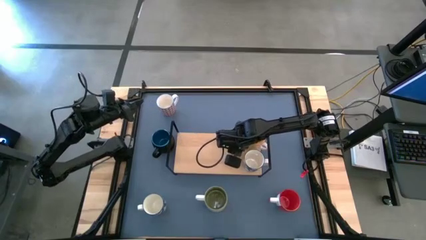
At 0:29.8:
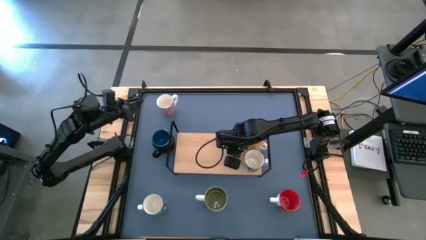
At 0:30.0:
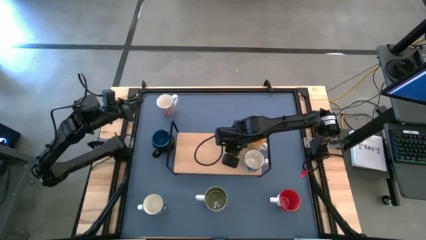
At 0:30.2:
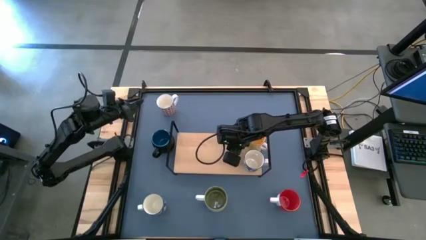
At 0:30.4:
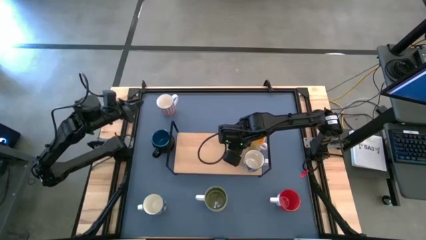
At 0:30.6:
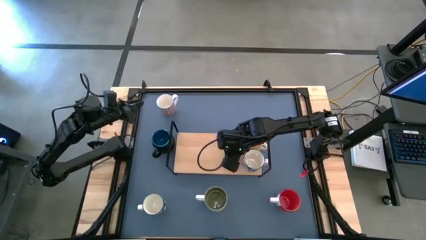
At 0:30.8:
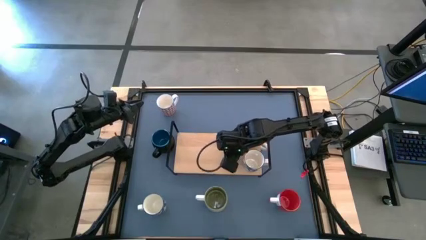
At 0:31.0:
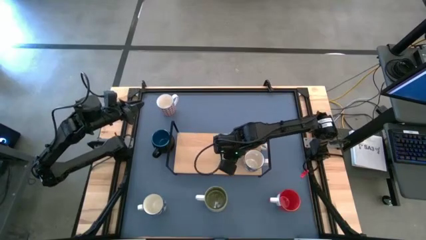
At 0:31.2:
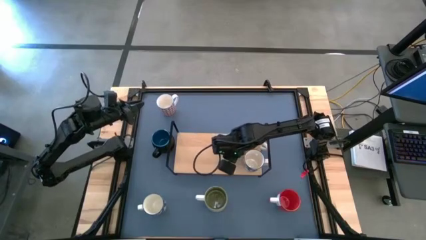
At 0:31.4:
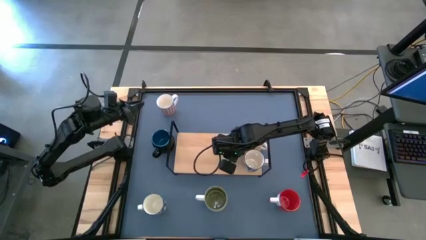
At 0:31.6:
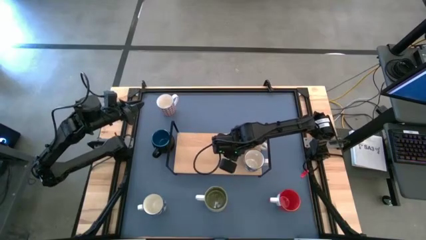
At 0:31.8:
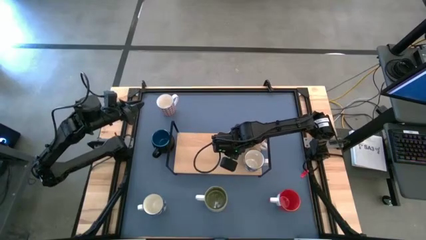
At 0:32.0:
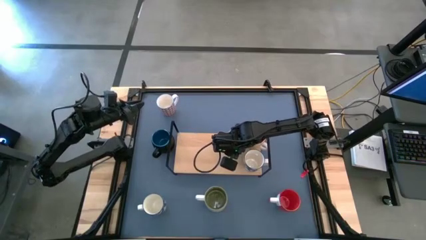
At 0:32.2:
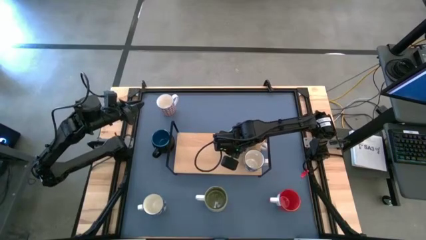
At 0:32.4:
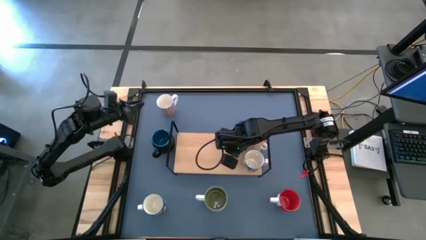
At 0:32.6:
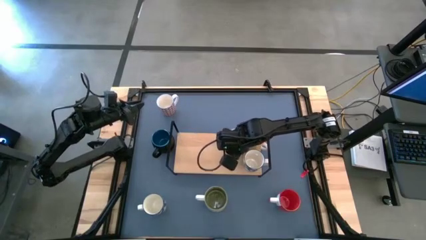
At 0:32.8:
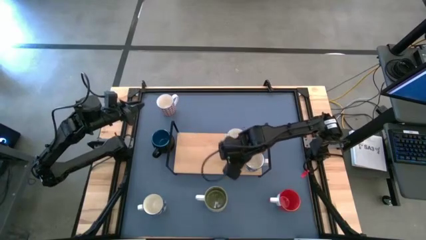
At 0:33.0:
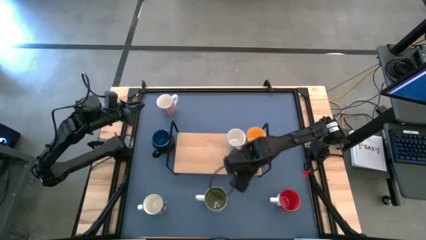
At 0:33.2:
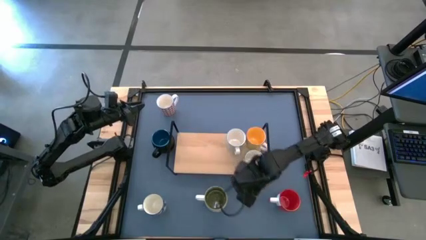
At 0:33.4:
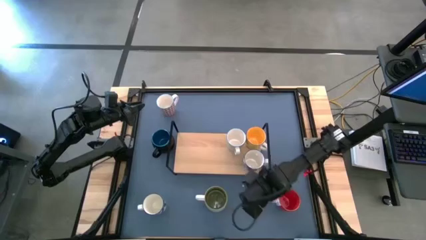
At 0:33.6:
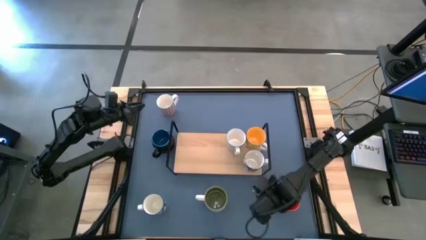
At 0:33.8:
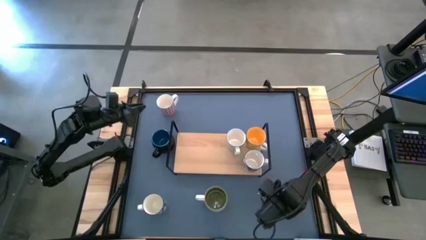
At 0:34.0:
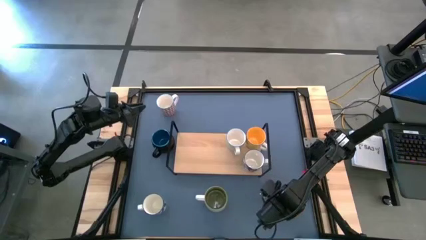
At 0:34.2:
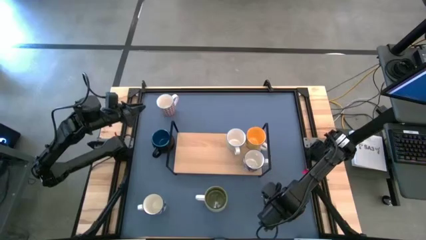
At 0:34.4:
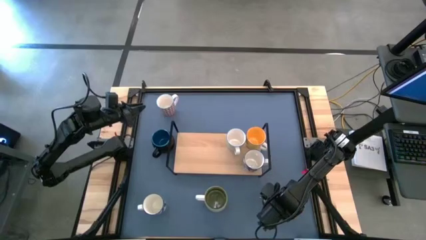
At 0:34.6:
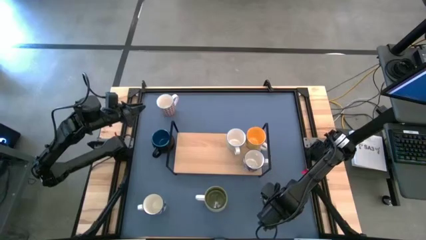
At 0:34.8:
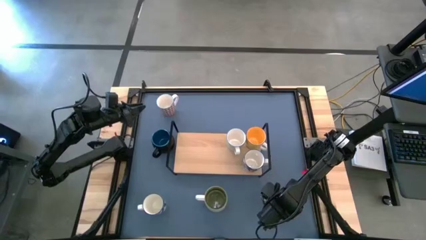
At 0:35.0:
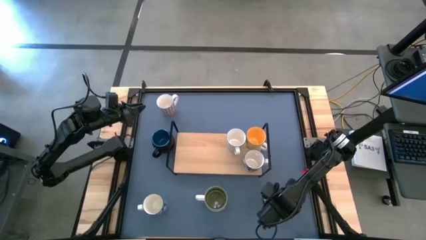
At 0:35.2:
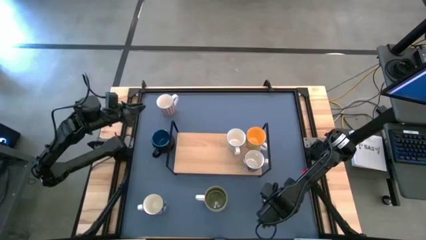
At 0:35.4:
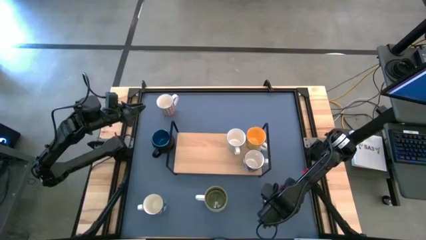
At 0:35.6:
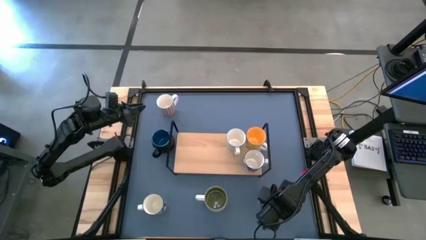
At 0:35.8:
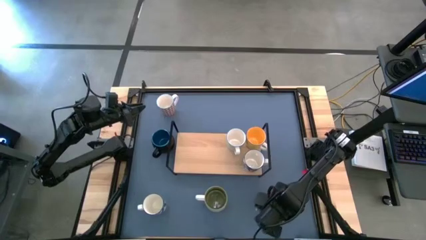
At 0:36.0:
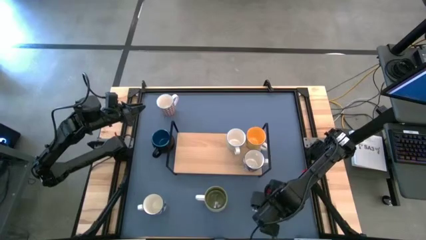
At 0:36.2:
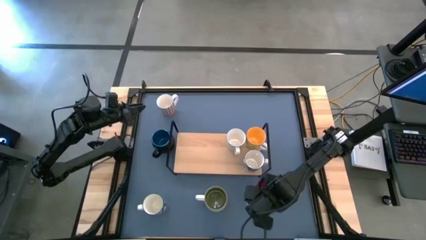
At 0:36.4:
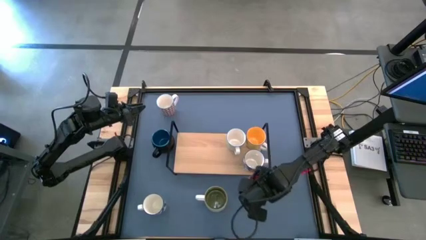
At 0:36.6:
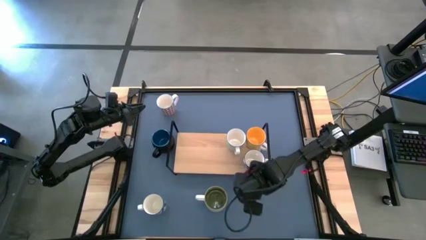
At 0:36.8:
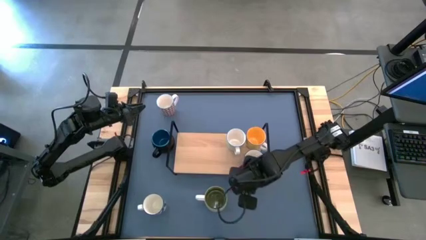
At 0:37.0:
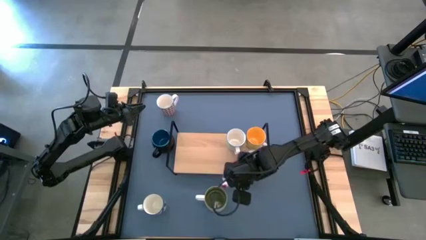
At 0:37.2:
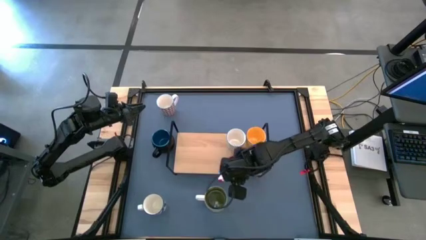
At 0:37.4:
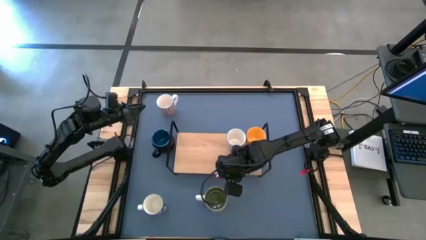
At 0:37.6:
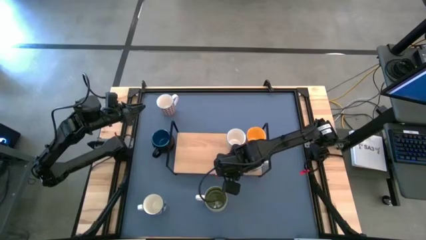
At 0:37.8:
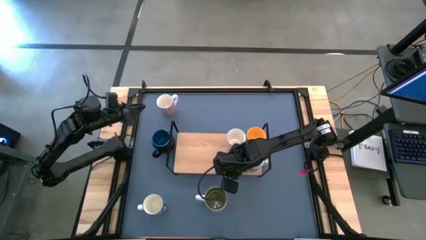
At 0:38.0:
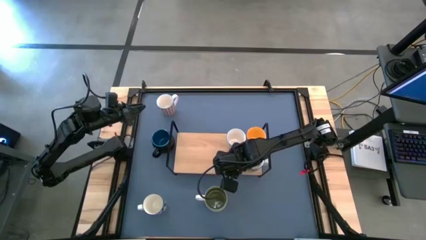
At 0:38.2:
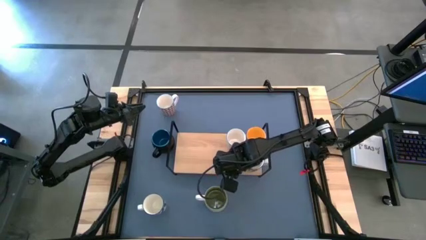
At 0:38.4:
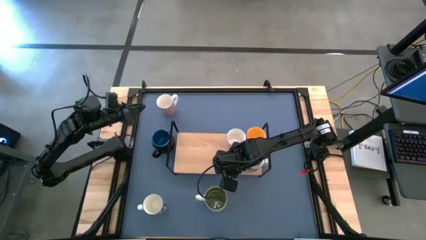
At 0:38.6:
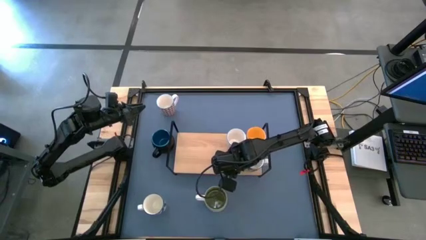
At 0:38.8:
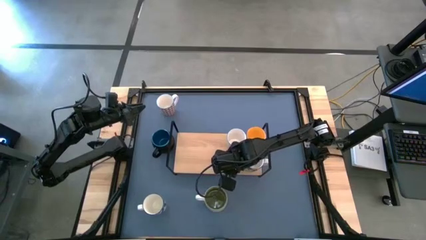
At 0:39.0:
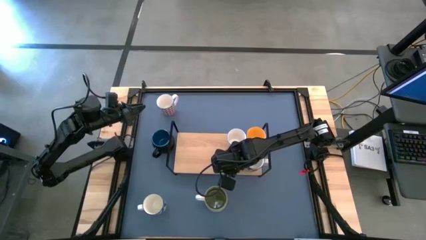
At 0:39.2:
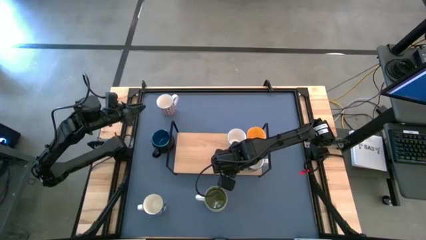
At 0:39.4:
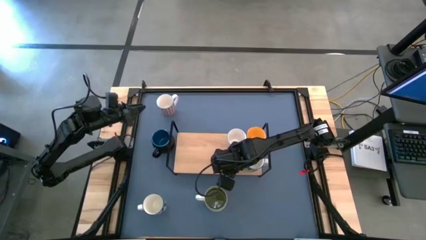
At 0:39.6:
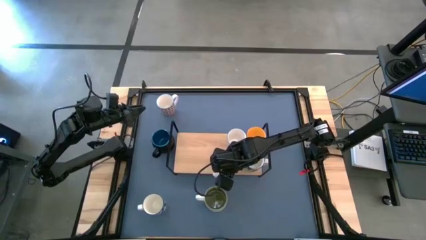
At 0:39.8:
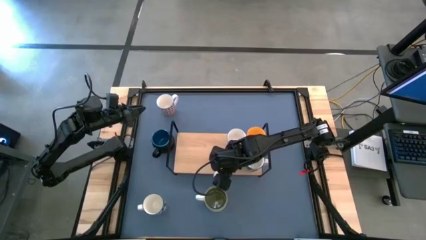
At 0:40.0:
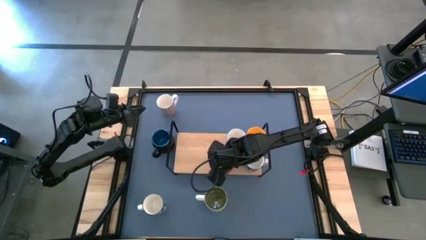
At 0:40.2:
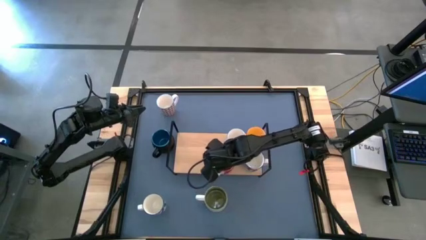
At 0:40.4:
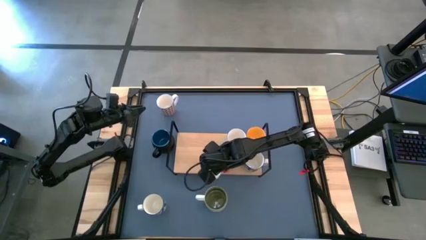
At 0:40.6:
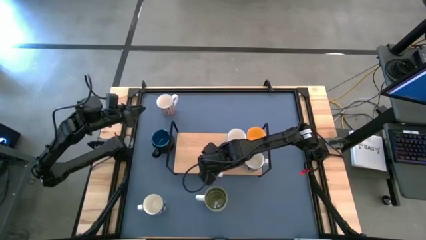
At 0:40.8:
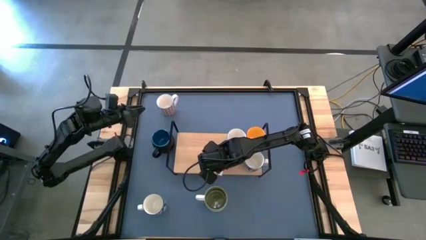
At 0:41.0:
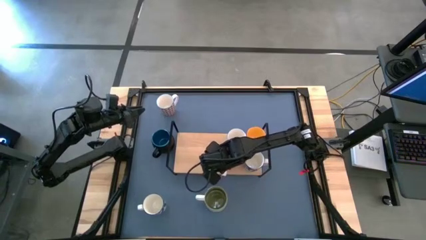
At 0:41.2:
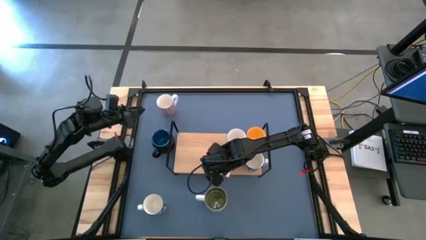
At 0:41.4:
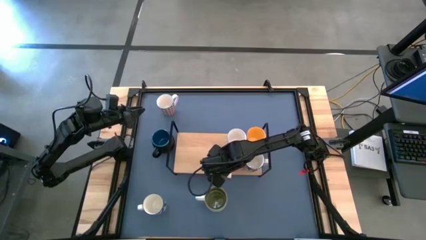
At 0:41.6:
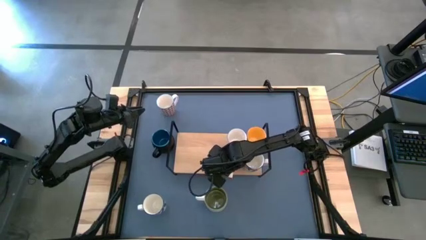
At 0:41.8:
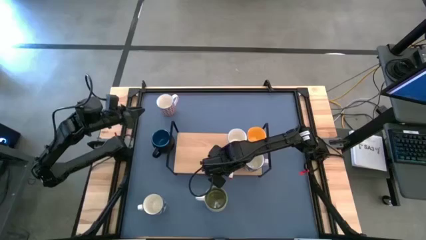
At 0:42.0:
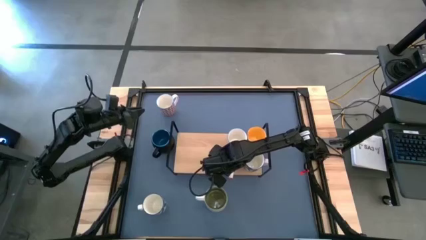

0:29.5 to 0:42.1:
Task: Place coffee mugs
Put the red mug on the shelf
